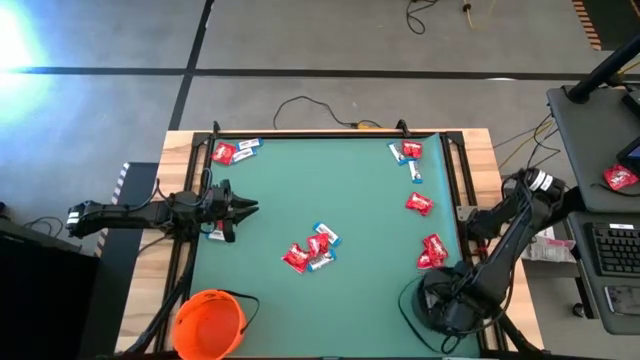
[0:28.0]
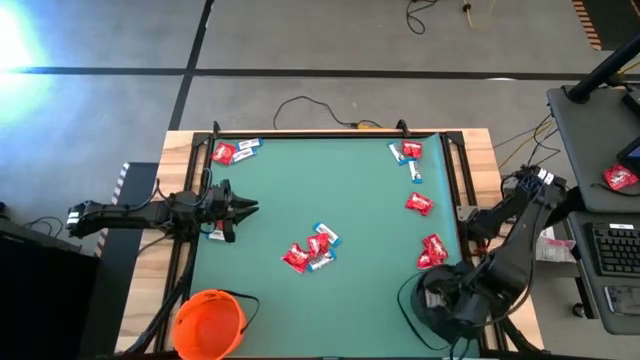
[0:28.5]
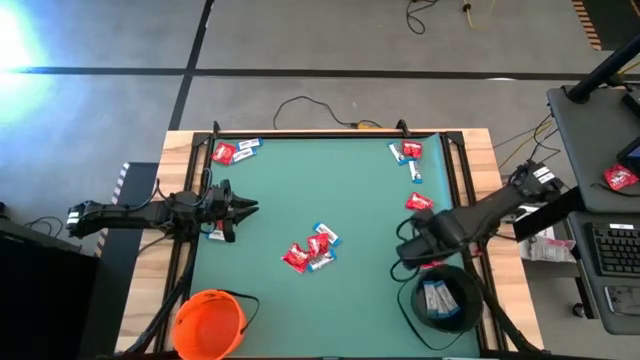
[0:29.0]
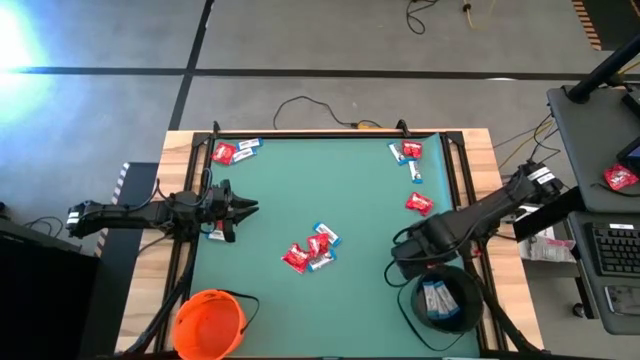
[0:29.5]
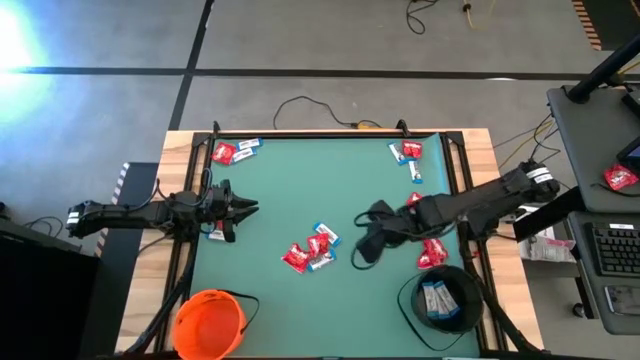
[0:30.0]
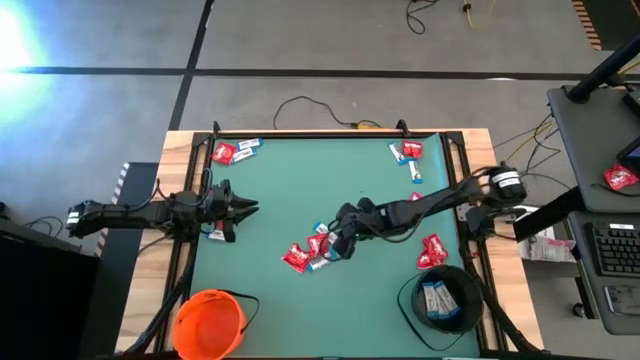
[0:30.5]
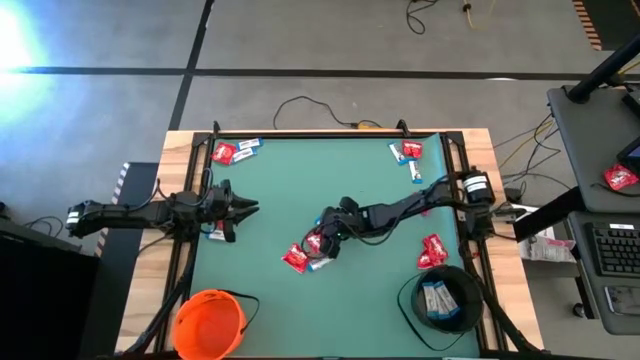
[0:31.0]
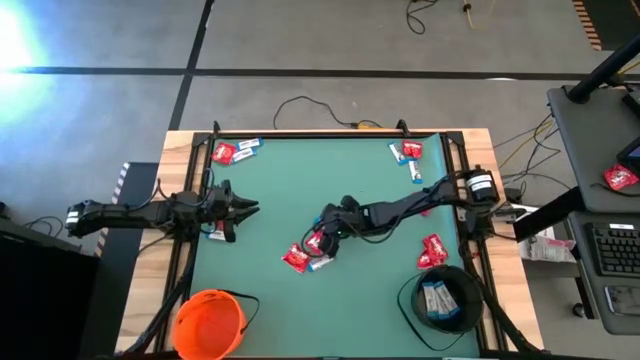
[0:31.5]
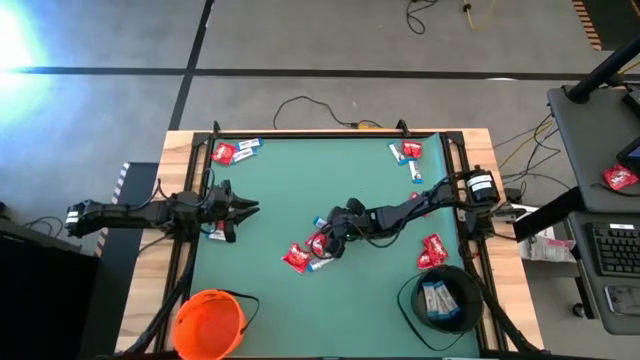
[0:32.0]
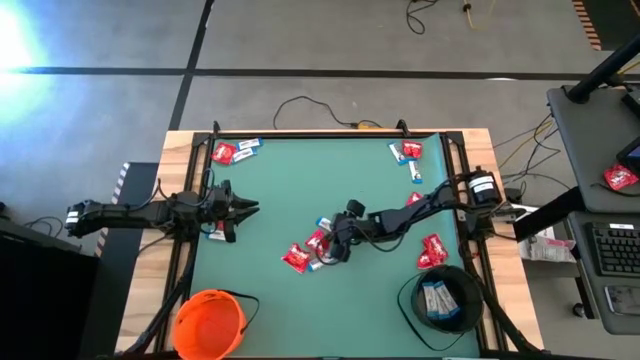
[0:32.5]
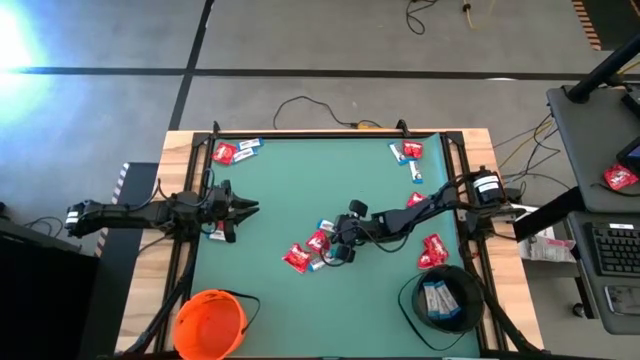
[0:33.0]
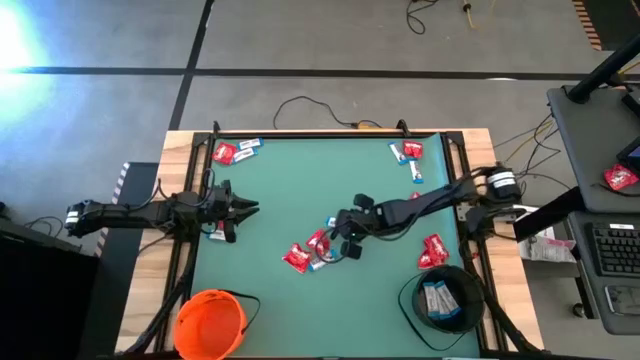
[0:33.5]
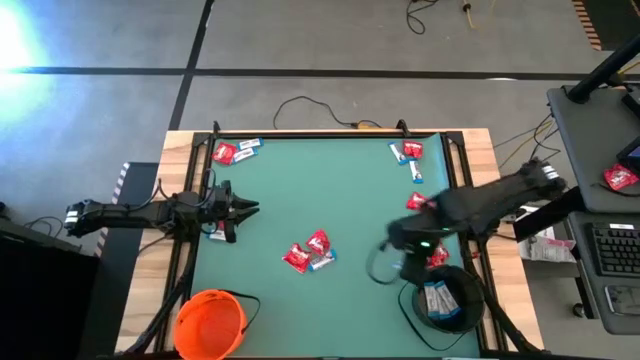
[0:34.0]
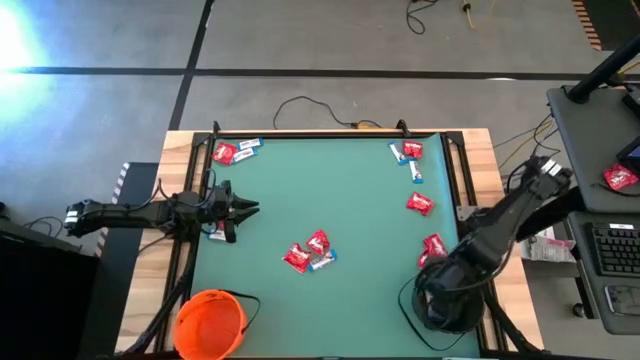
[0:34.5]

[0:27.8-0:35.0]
Task: Sort candy by brand, put in halloween buckets
Put the white chocolate into the black bucket

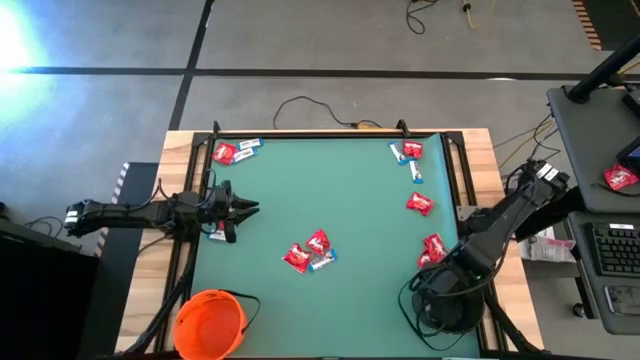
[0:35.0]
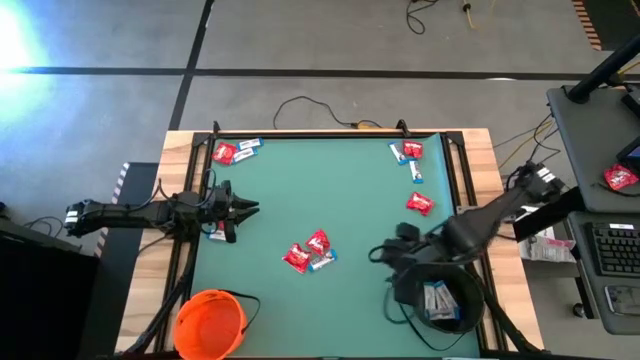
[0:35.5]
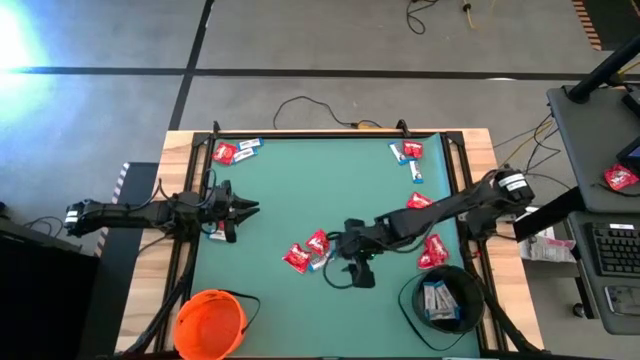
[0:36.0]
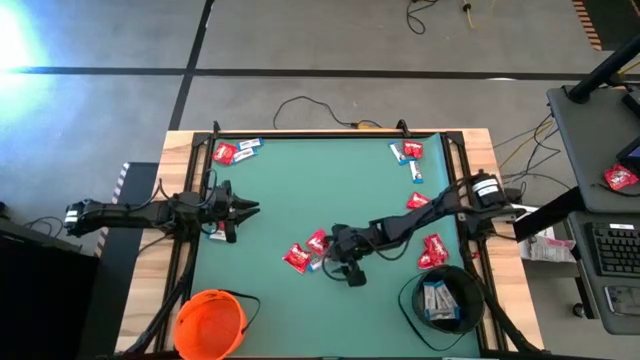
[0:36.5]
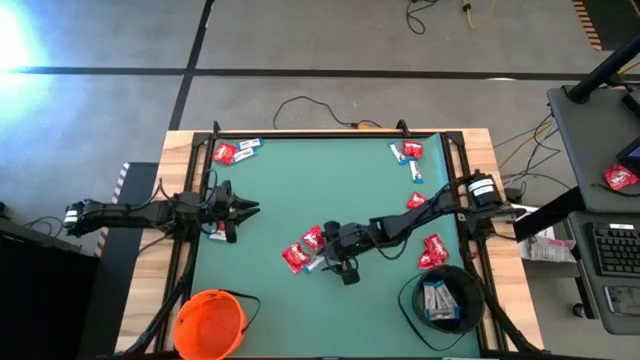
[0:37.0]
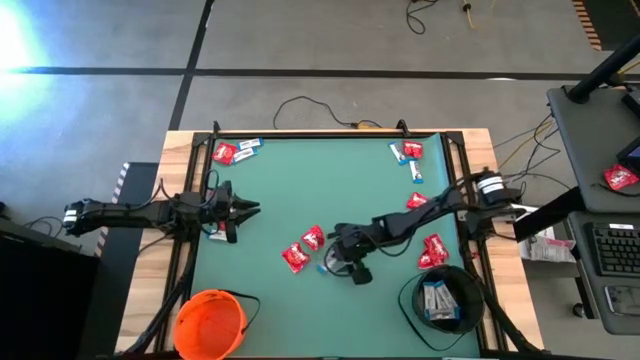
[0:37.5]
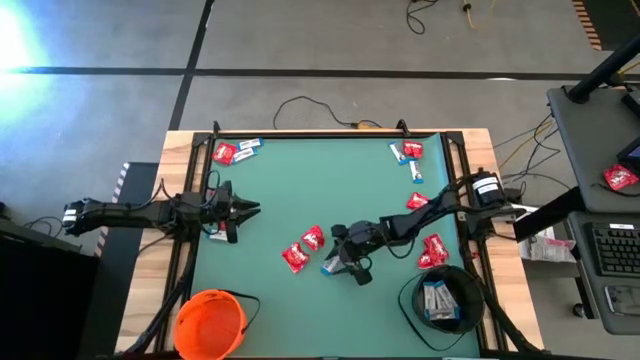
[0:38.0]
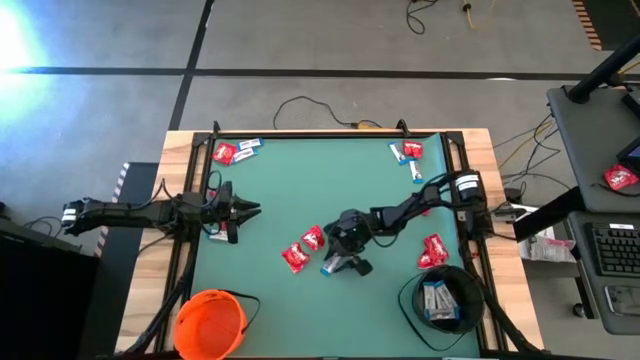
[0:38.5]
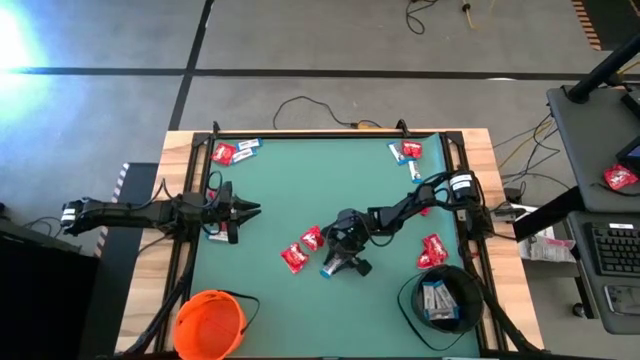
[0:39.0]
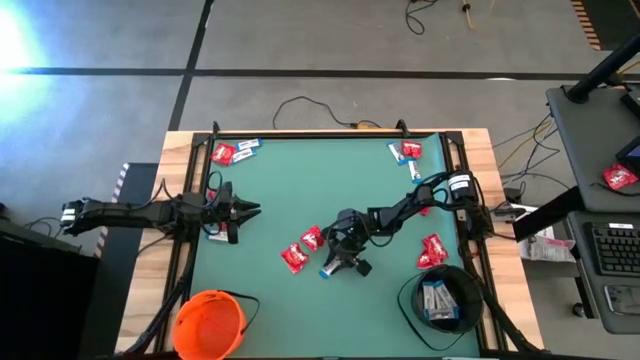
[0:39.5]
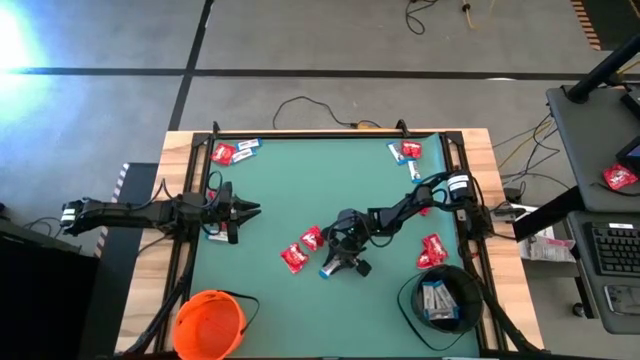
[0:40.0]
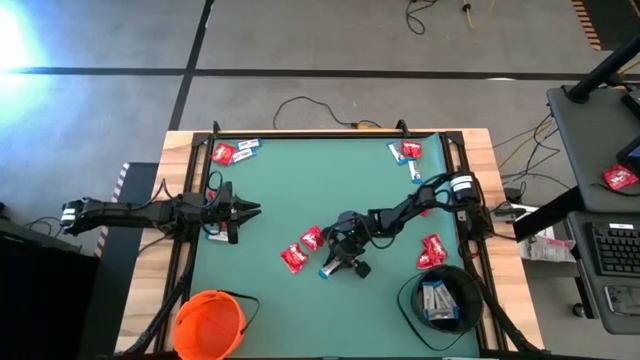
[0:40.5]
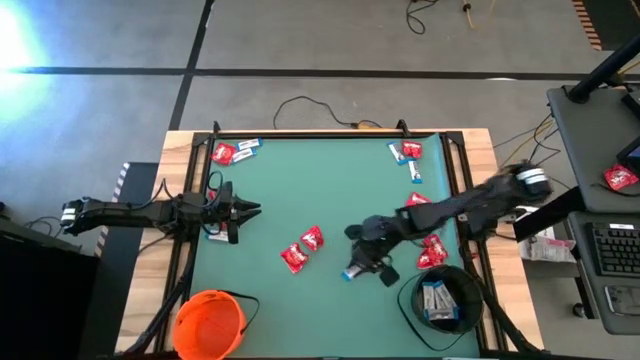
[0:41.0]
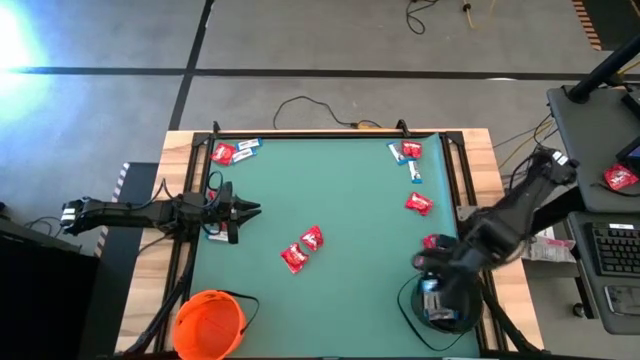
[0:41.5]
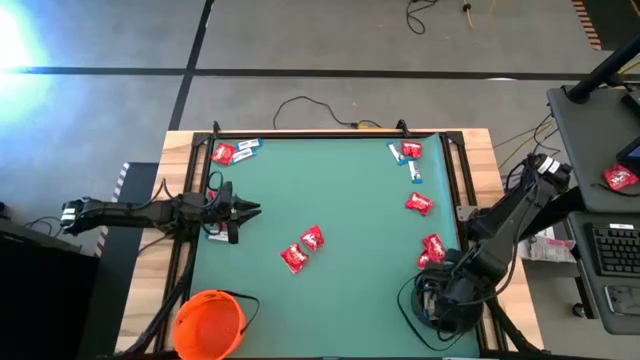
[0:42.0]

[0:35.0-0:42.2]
Put the white chocolate into the black bucket

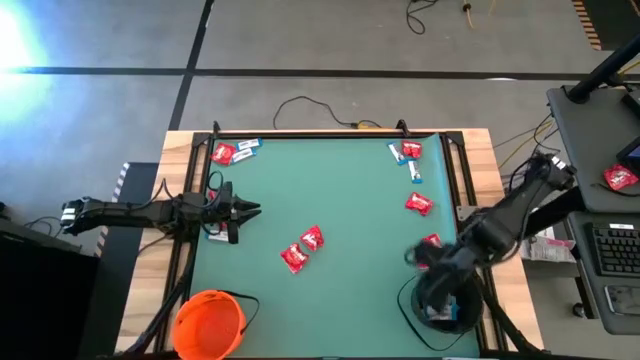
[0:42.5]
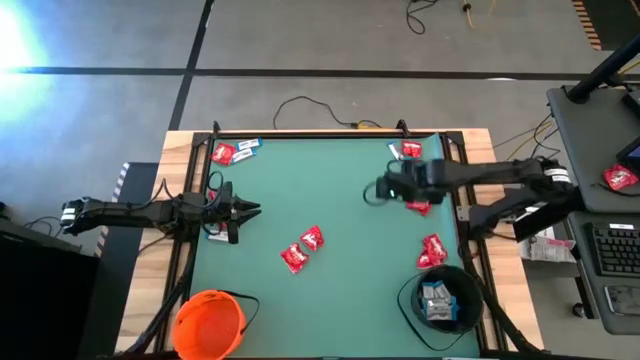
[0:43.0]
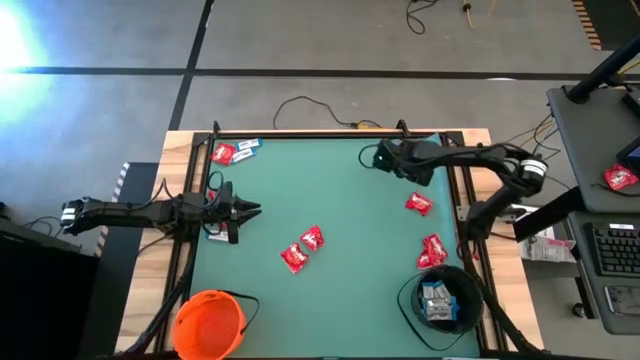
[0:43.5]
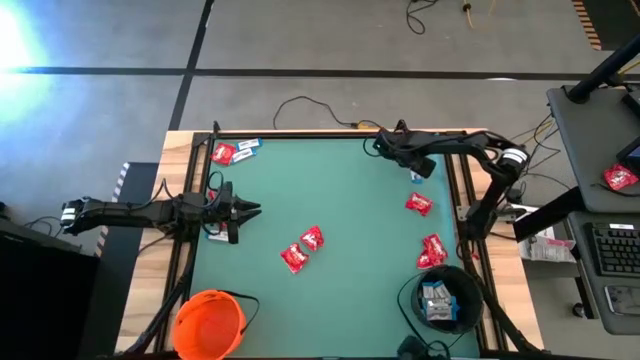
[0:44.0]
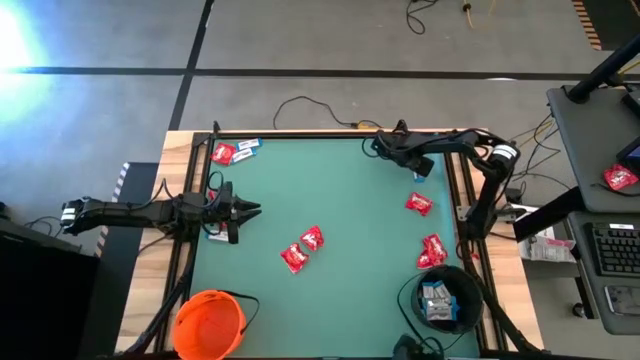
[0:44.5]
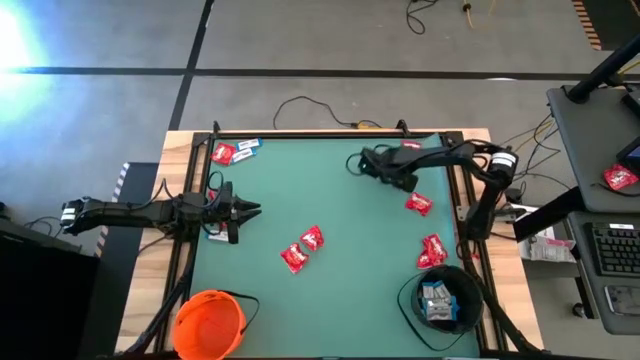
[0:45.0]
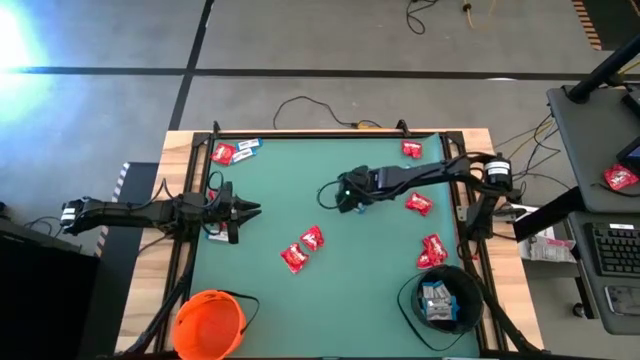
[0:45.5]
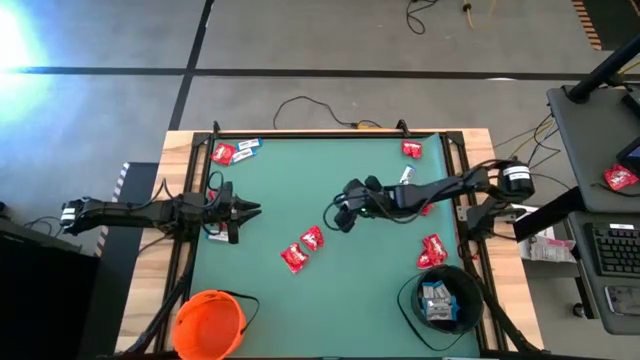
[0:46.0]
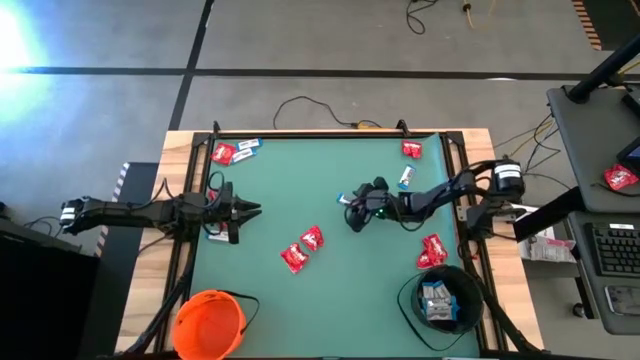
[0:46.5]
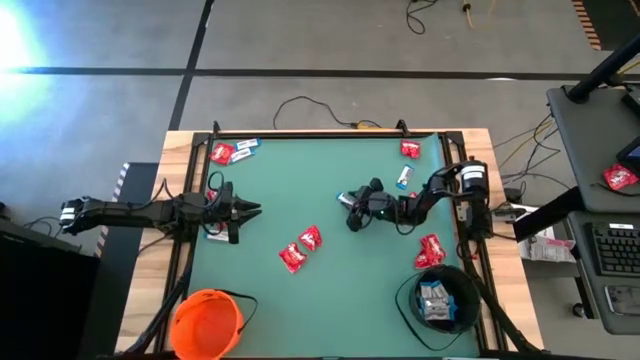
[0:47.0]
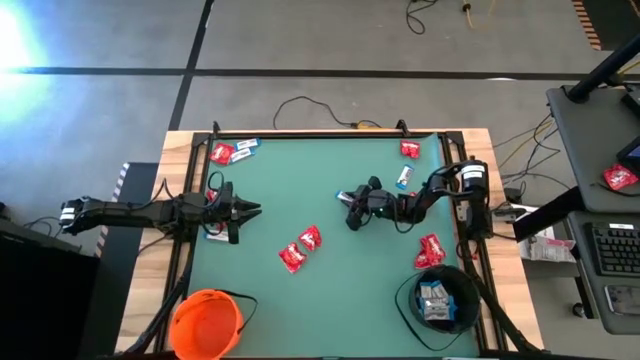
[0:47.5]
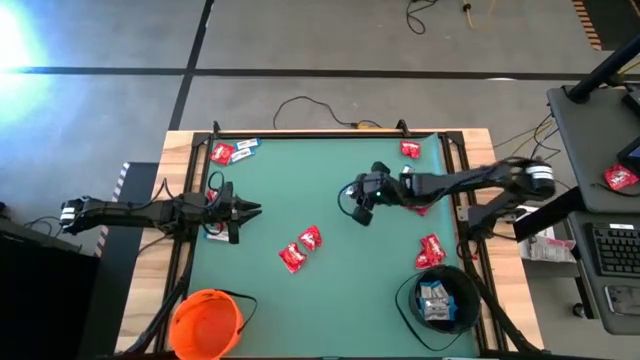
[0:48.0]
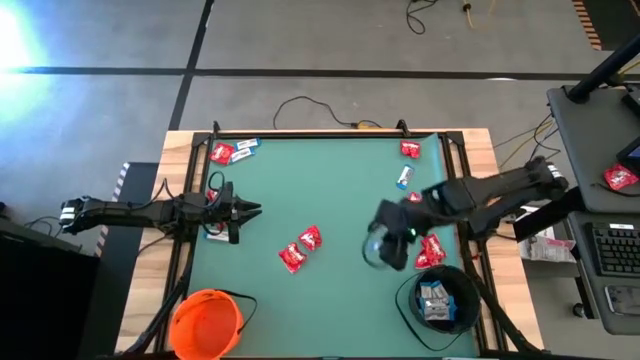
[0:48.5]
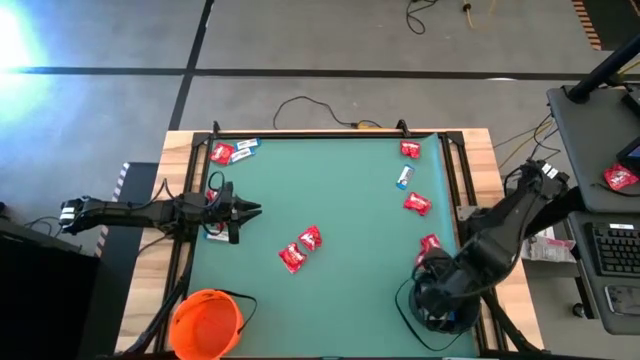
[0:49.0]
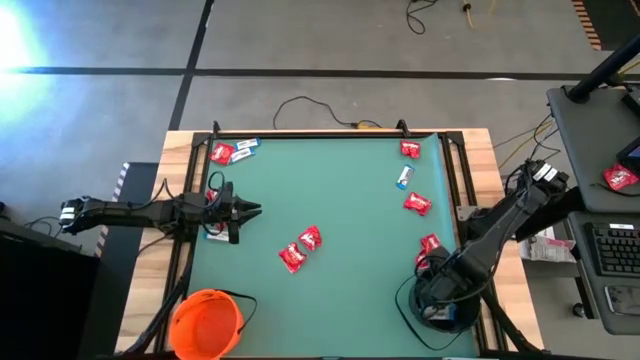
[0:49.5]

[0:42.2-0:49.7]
Put the white chocolate into the black bucket
